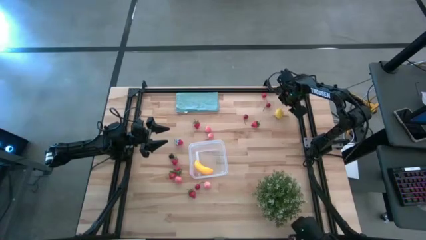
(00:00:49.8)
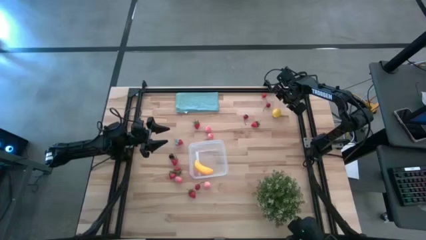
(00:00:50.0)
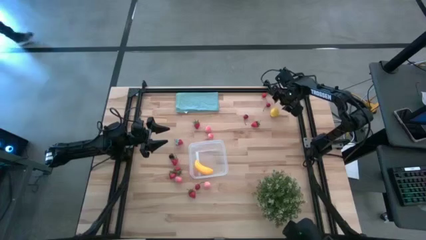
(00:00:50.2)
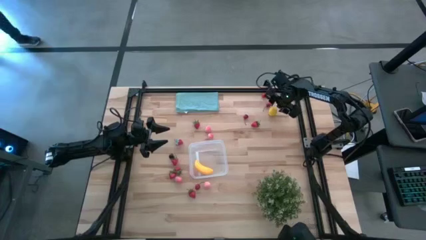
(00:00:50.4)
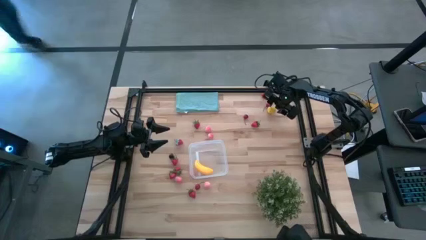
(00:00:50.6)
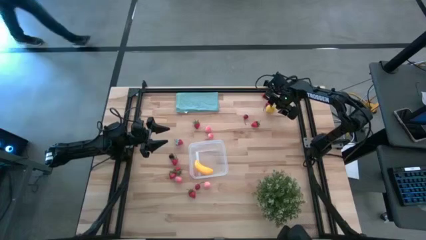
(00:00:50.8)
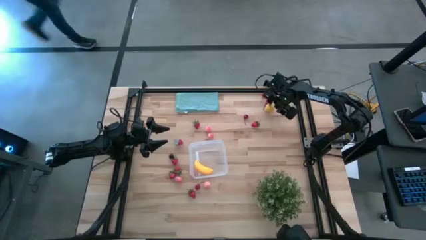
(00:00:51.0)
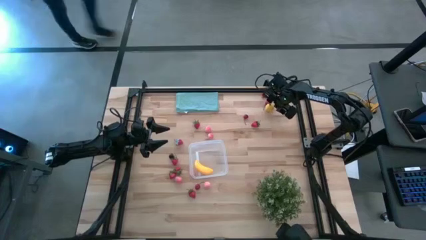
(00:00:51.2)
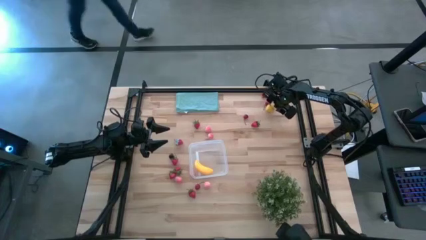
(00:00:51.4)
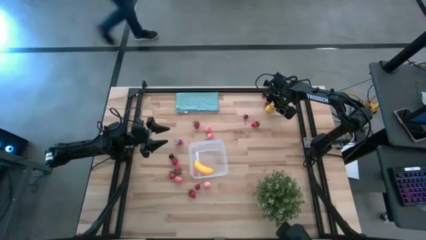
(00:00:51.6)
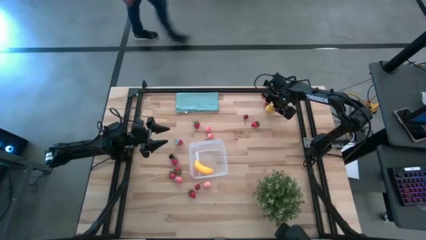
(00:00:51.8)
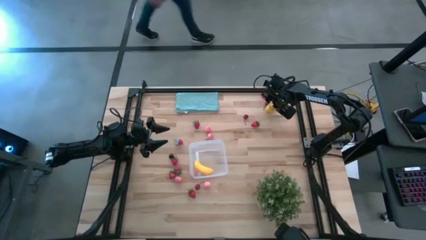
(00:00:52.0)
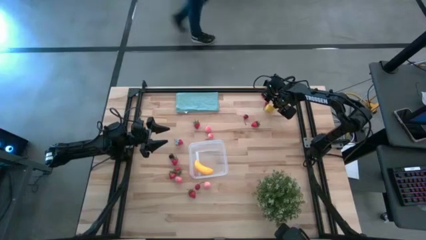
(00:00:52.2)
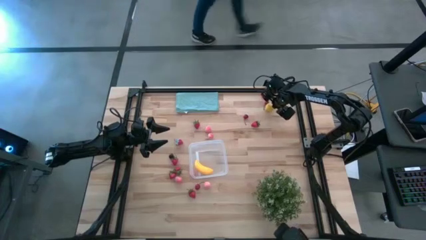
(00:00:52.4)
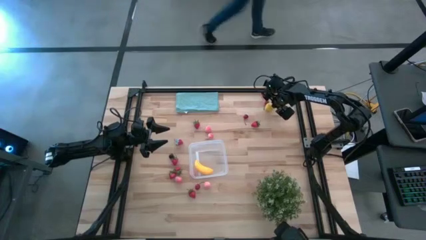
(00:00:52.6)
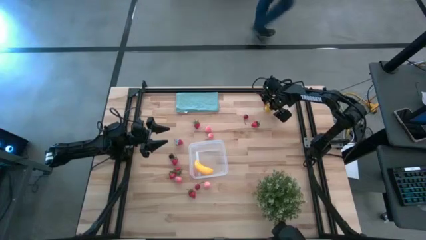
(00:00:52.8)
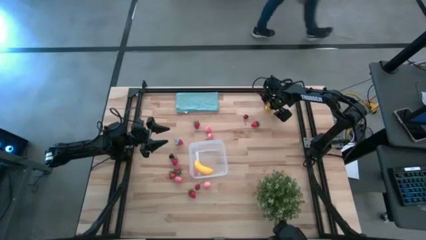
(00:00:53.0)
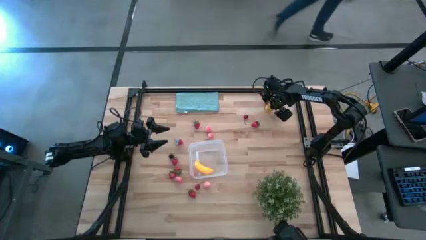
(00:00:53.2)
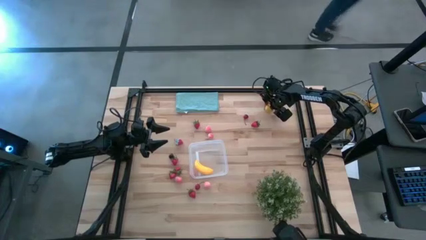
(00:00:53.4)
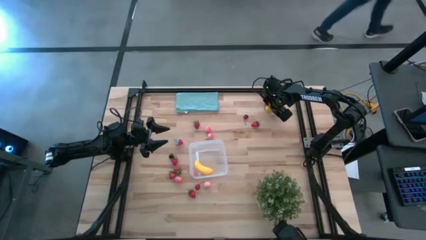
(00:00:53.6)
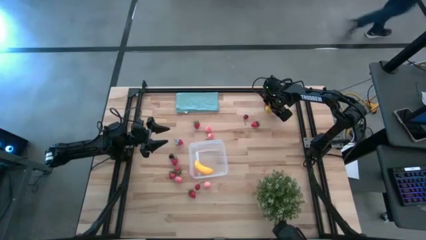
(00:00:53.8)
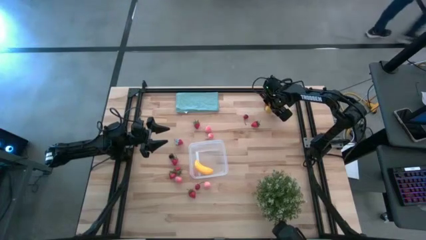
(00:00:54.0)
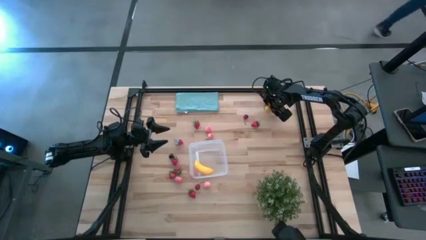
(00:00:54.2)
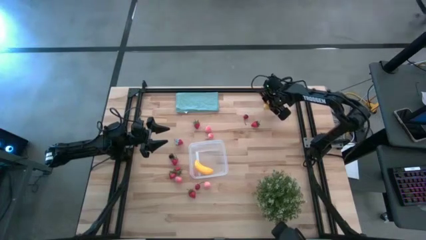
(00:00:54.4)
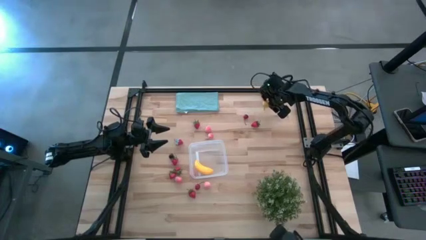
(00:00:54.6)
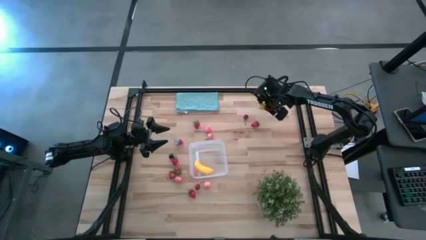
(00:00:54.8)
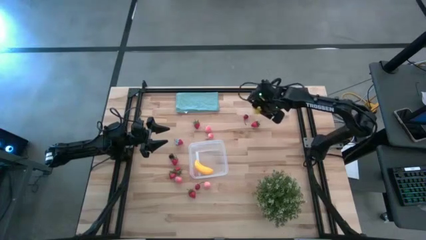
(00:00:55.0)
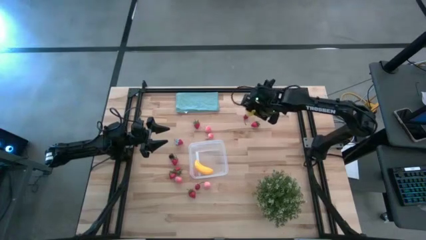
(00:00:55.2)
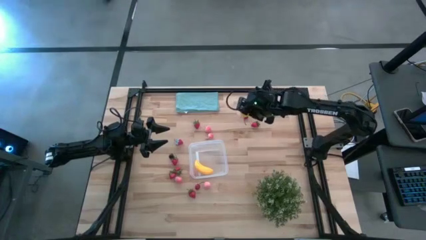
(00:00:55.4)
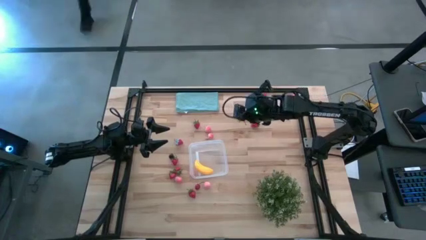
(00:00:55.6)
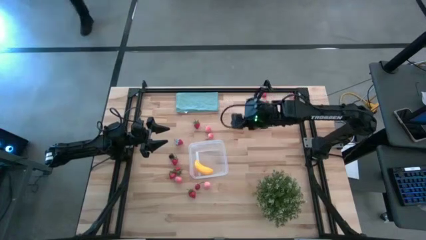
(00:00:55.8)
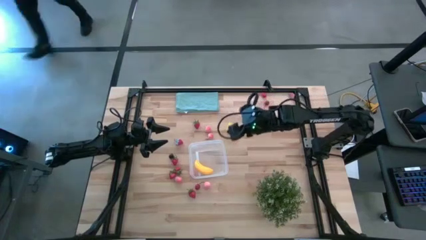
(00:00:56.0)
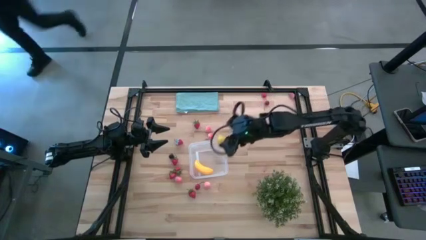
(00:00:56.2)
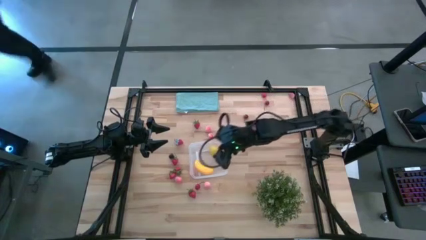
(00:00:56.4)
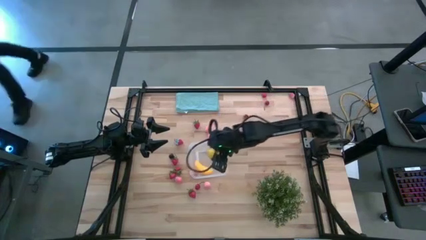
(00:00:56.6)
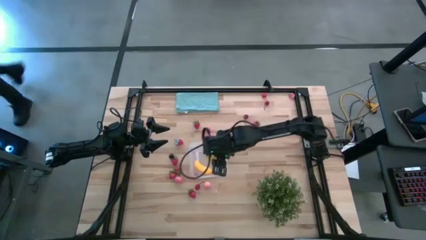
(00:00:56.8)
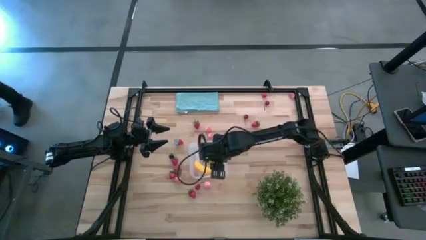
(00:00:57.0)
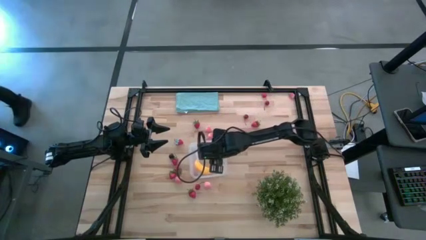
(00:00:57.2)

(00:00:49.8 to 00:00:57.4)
Task: Pick and placing Produce into tupperware
Put the yellow lemon into the transparent bin

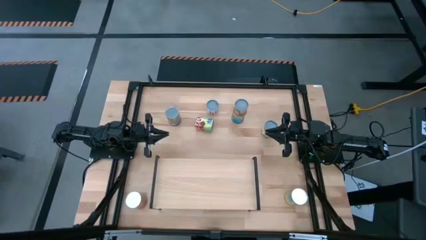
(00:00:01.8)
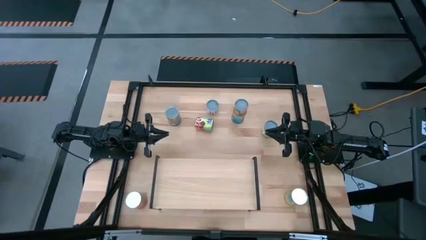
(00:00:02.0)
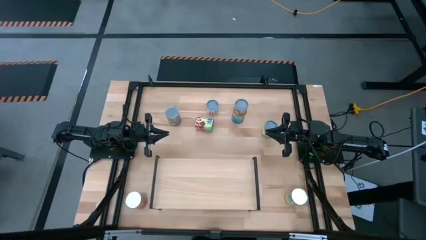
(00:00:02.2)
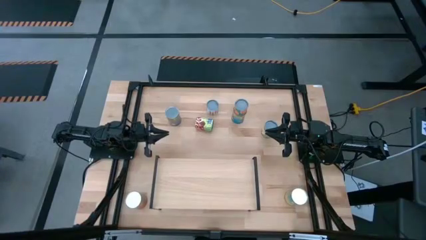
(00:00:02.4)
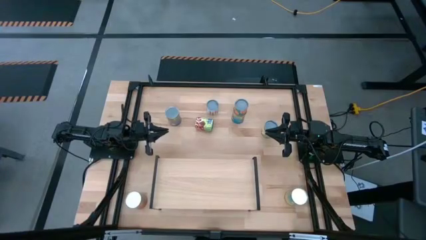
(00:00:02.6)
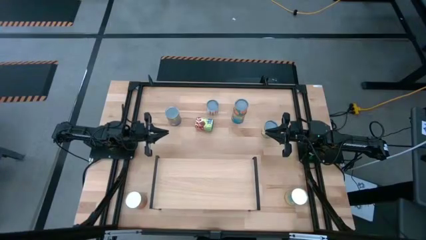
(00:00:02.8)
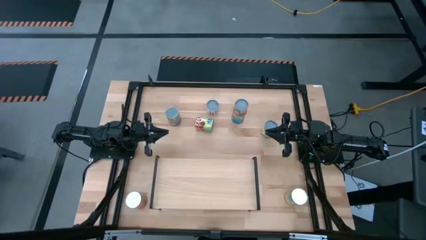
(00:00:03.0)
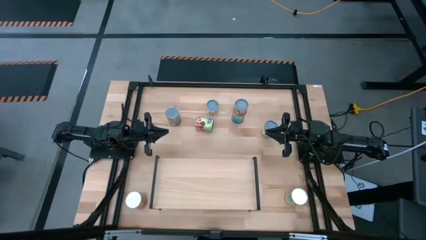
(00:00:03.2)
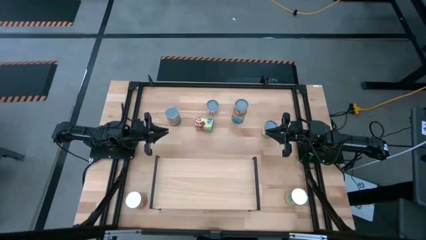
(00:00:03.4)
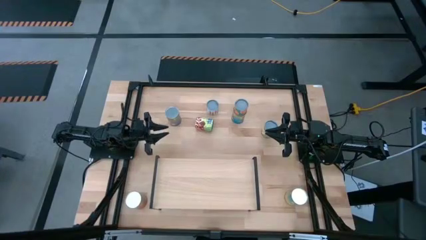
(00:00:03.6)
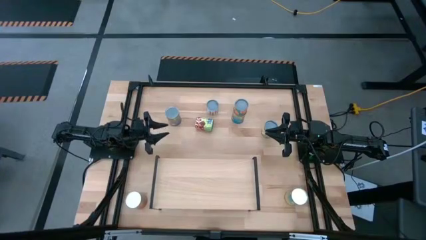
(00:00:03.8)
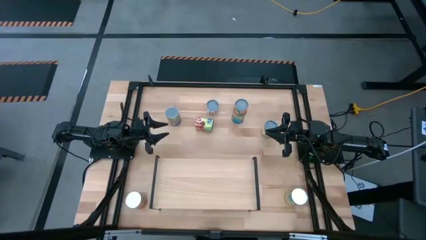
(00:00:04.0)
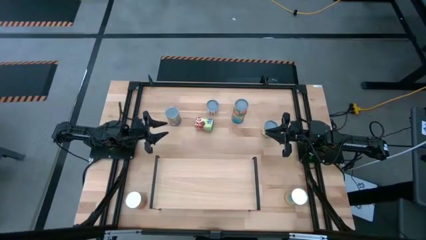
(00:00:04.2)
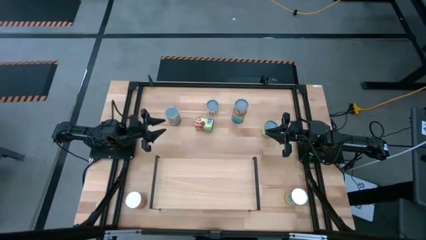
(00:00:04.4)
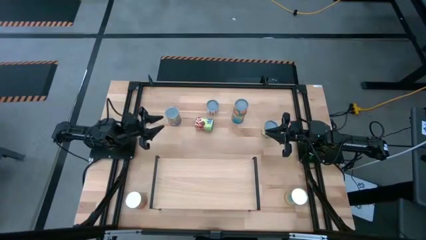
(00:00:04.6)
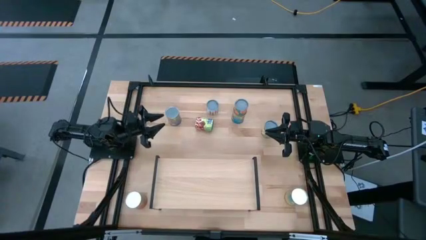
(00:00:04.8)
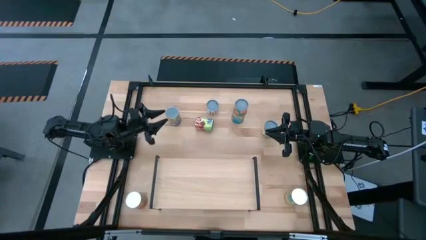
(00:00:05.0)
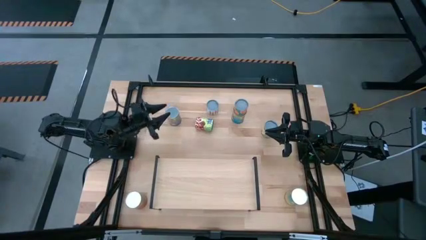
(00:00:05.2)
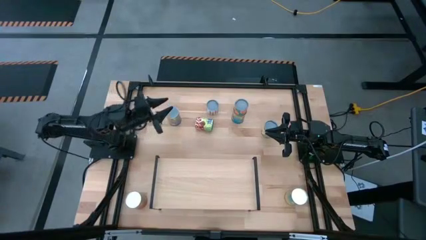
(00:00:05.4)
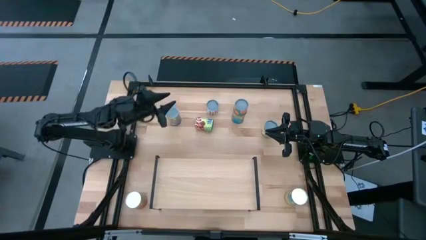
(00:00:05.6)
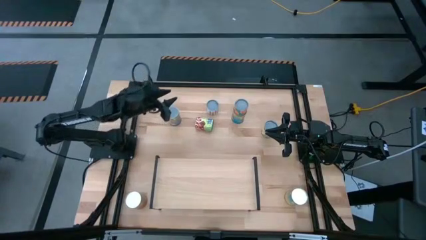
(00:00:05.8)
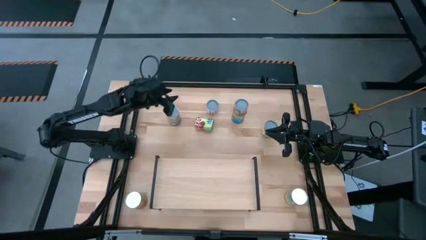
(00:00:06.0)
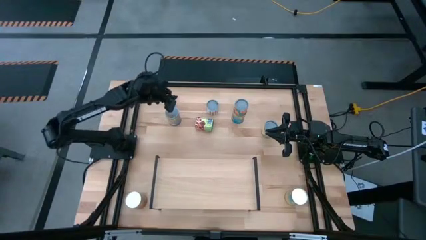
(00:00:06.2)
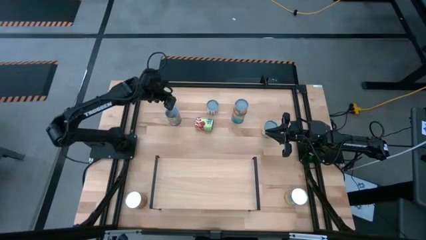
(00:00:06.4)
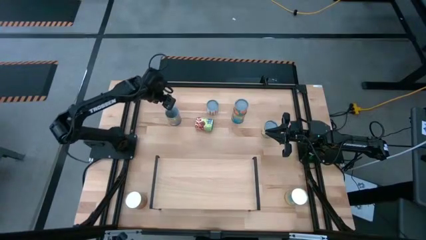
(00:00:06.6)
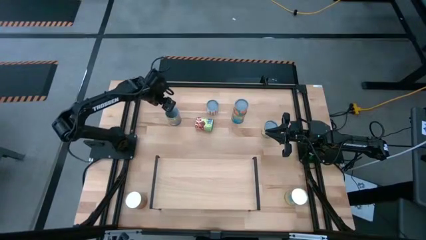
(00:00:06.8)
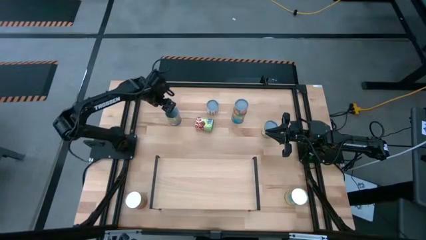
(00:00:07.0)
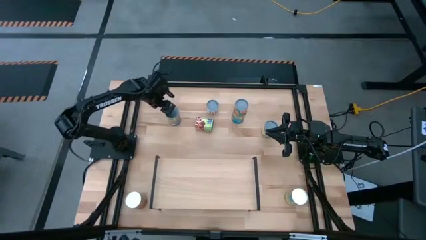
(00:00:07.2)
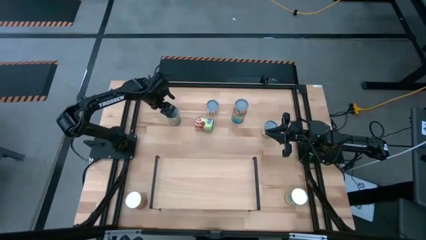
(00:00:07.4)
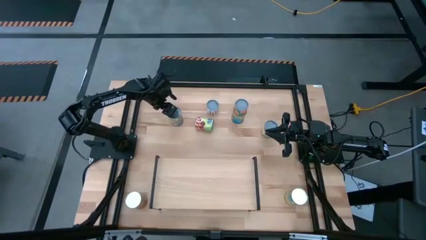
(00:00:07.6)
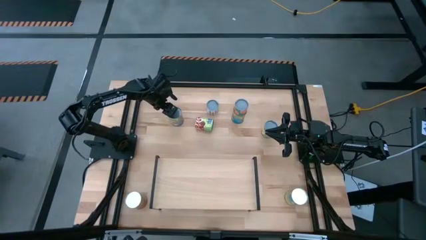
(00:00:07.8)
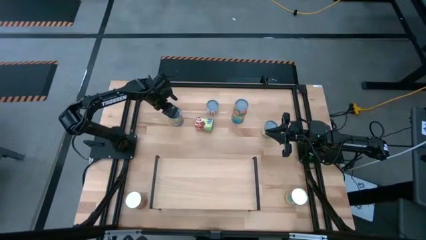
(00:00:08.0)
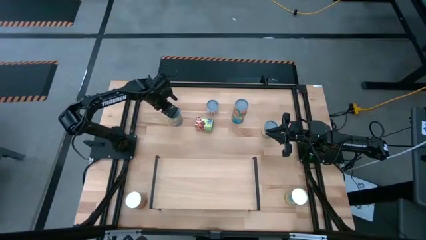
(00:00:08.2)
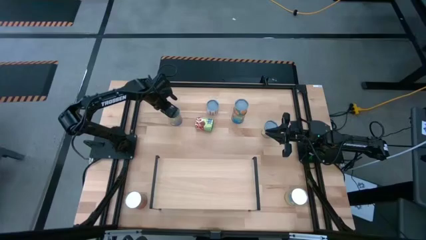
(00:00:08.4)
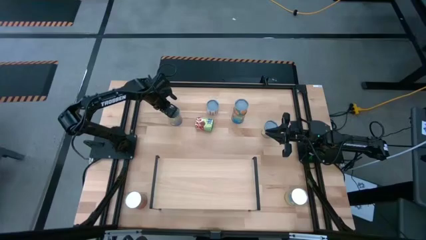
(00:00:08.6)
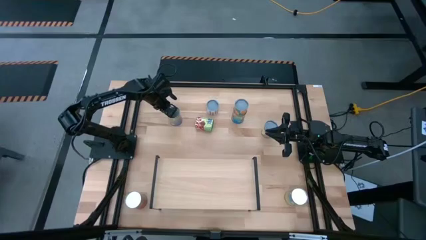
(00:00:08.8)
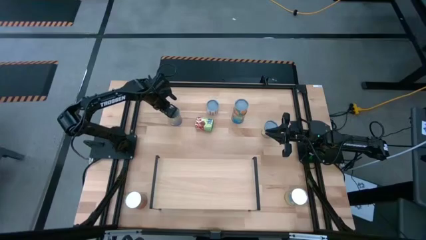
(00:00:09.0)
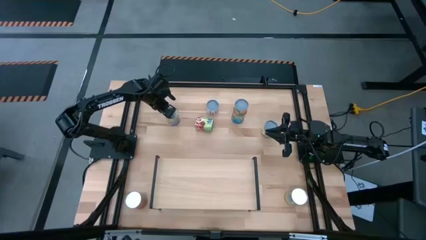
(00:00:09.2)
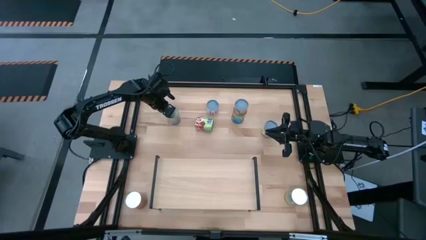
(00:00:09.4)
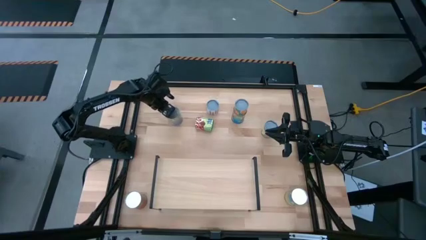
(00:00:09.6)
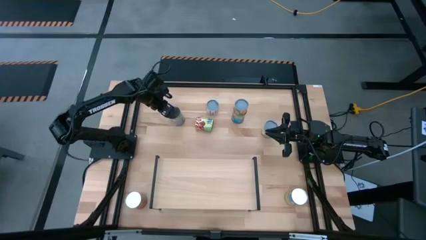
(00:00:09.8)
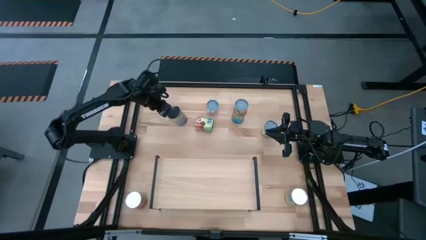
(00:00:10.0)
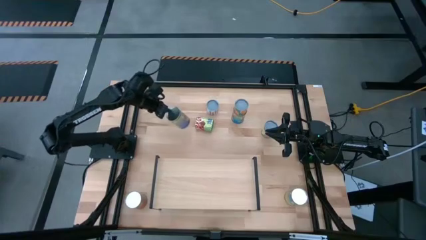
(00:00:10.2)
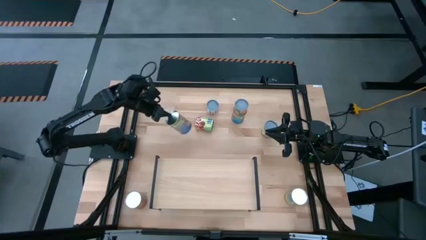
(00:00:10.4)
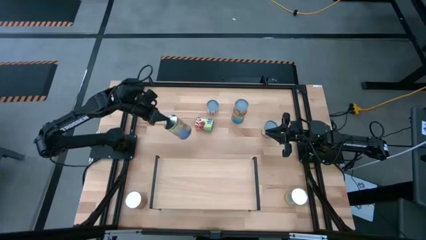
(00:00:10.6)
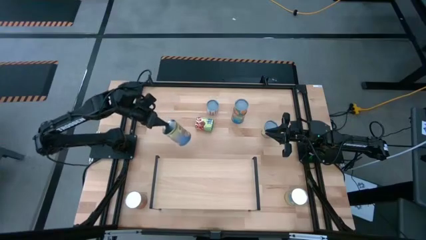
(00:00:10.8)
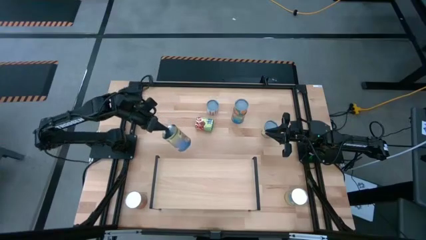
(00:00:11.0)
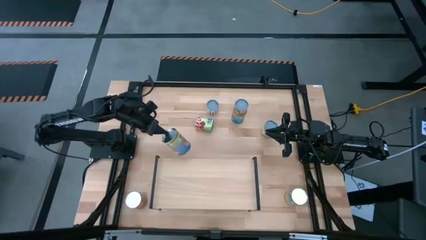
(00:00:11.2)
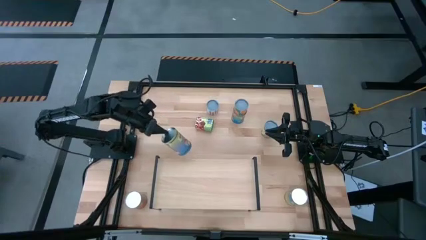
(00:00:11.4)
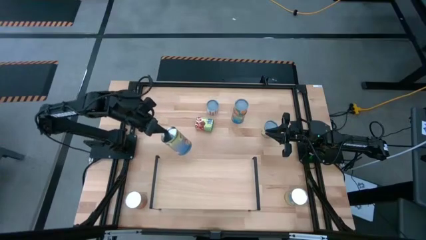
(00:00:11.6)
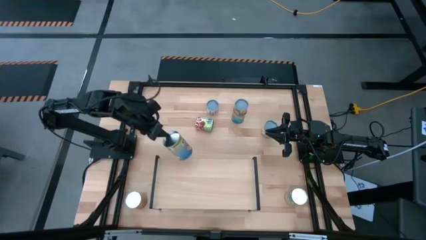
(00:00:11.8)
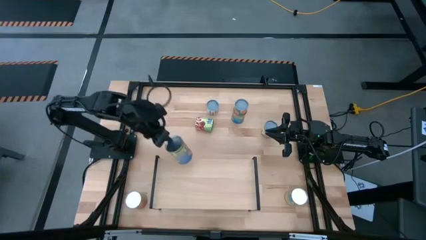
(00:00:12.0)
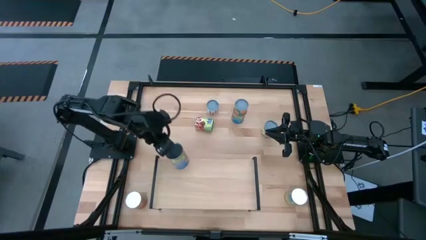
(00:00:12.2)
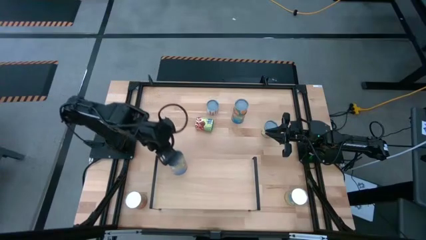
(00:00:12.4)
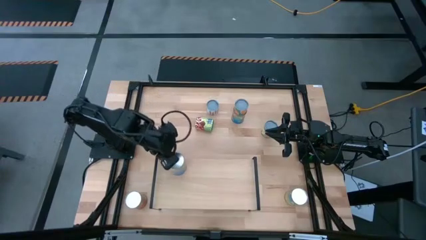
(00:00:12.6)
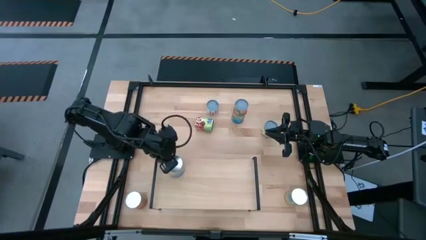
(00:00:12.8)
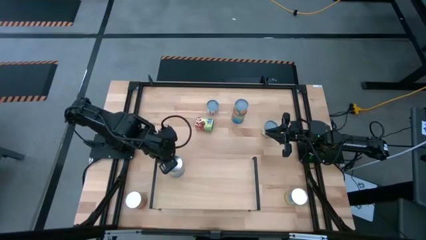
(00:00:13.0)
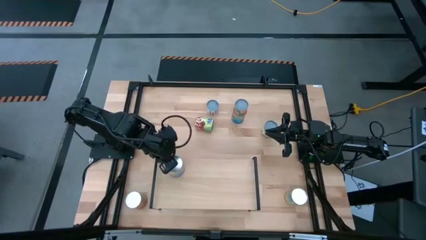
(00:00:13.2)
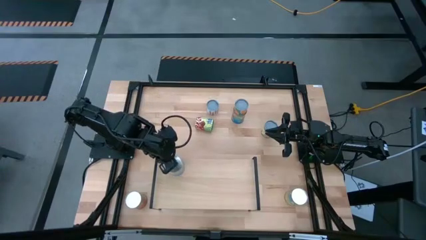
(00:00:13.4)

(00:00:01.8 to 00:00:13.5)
Task: Pick and place cans onto a shelf
Put the canned peaches on the shelf
